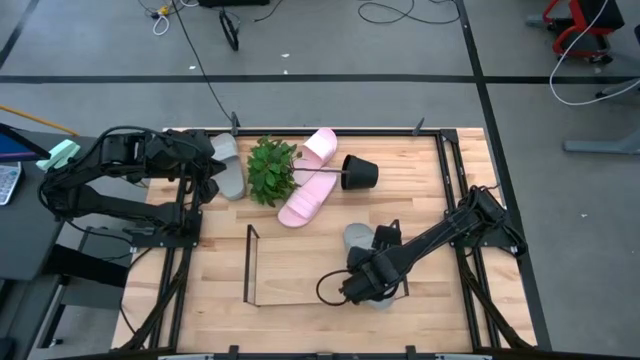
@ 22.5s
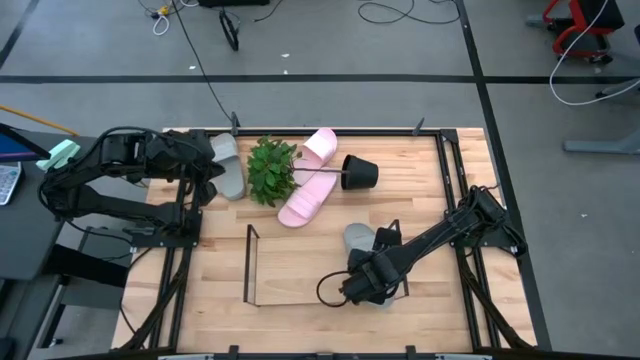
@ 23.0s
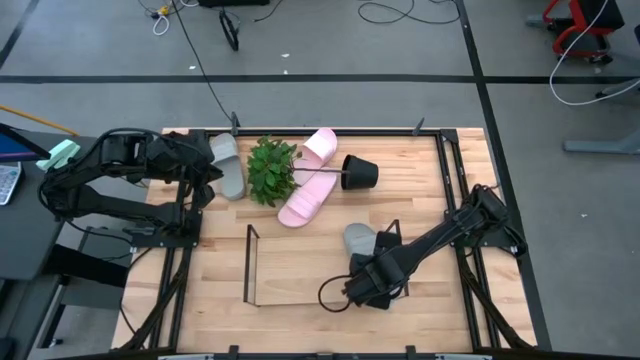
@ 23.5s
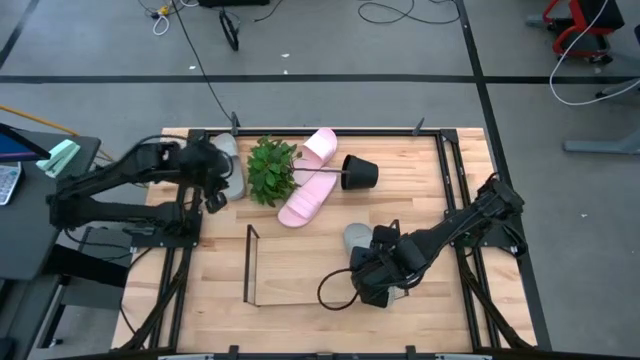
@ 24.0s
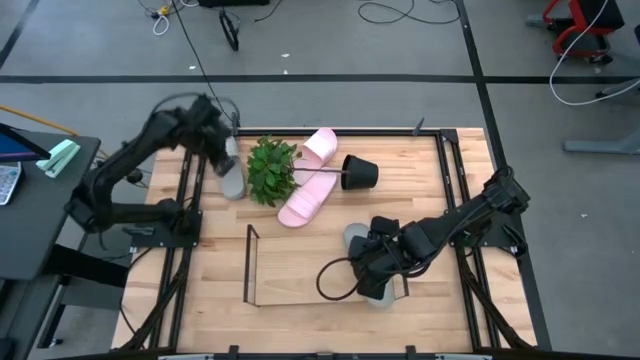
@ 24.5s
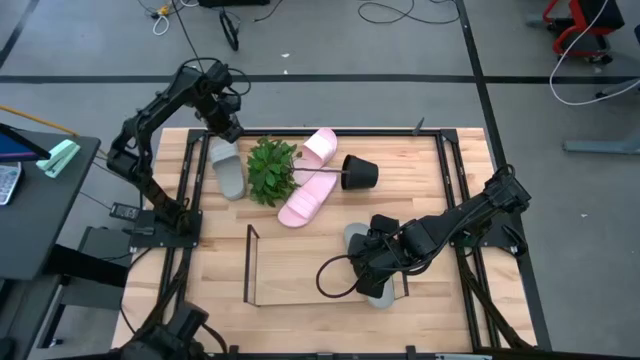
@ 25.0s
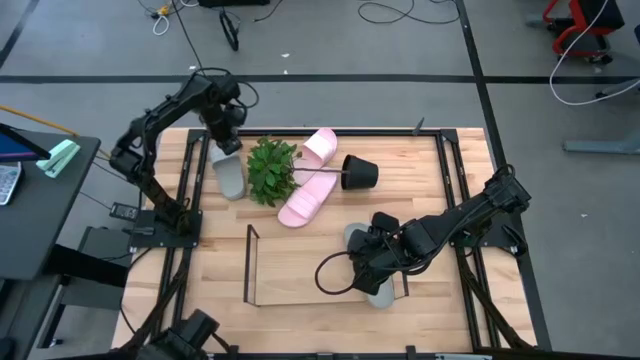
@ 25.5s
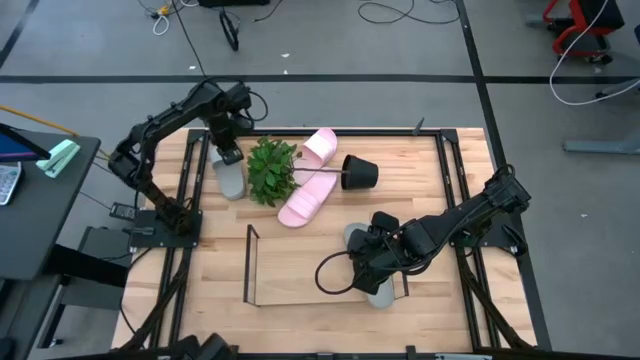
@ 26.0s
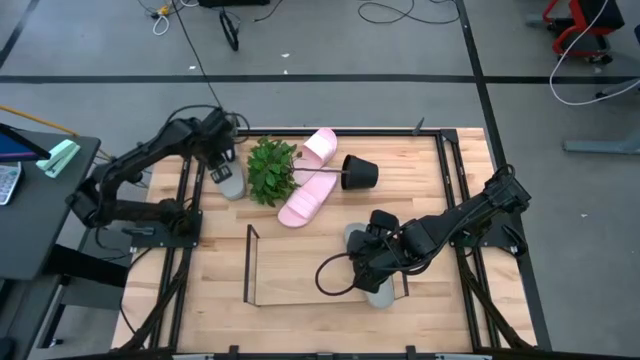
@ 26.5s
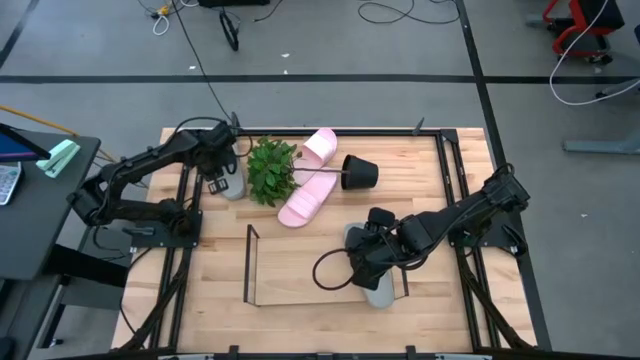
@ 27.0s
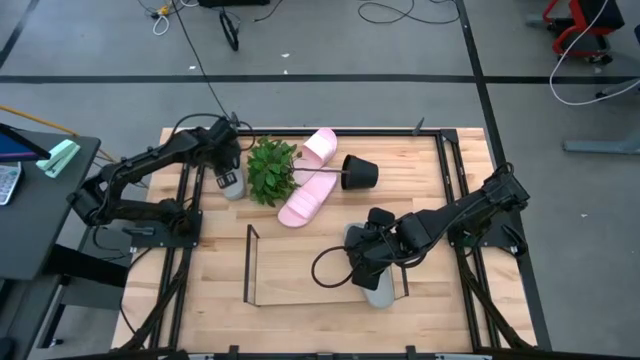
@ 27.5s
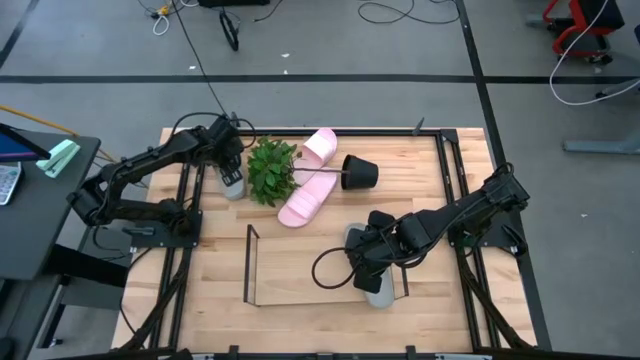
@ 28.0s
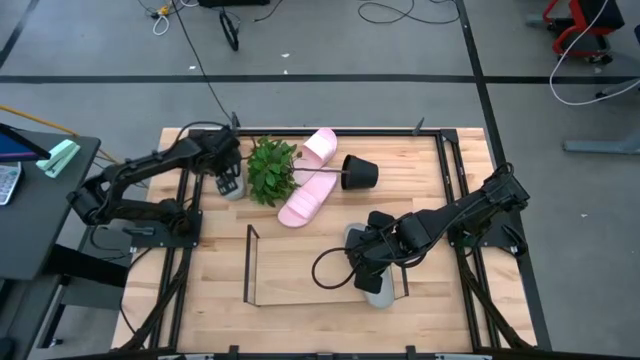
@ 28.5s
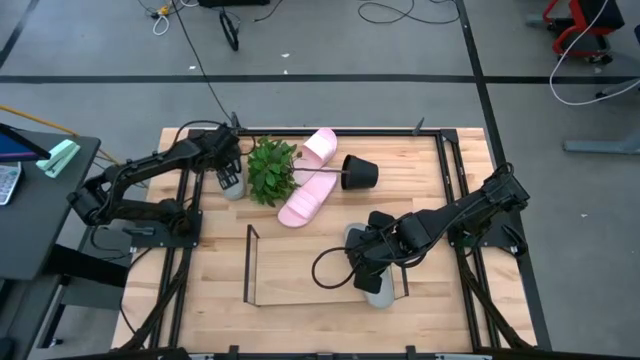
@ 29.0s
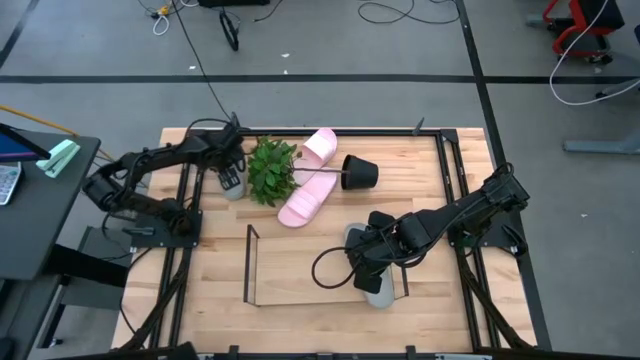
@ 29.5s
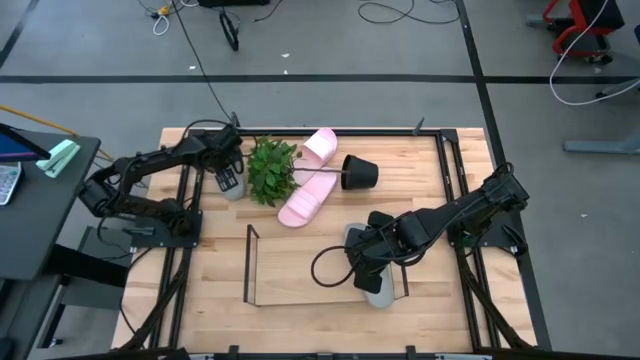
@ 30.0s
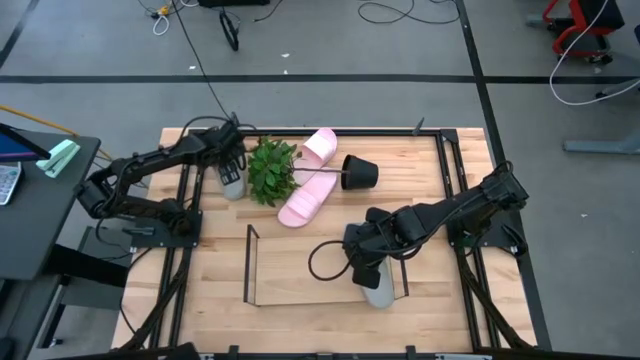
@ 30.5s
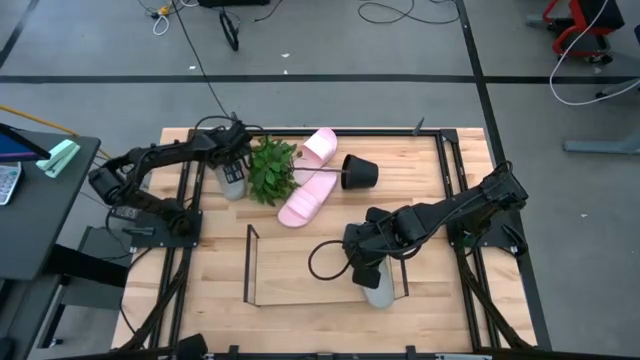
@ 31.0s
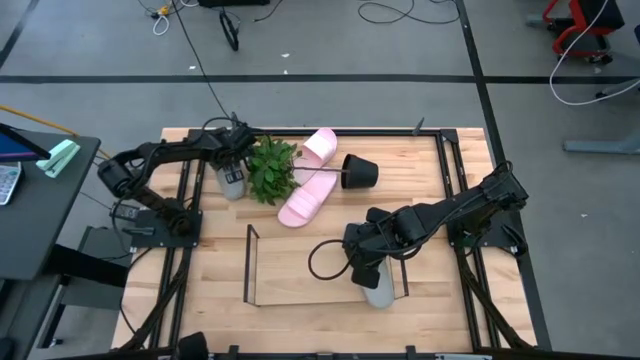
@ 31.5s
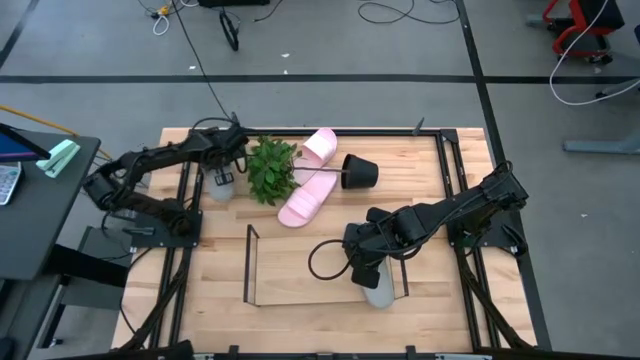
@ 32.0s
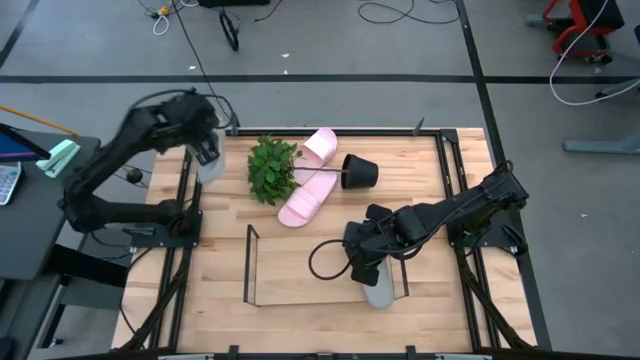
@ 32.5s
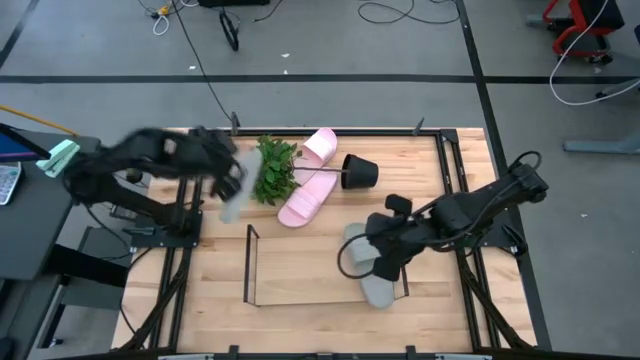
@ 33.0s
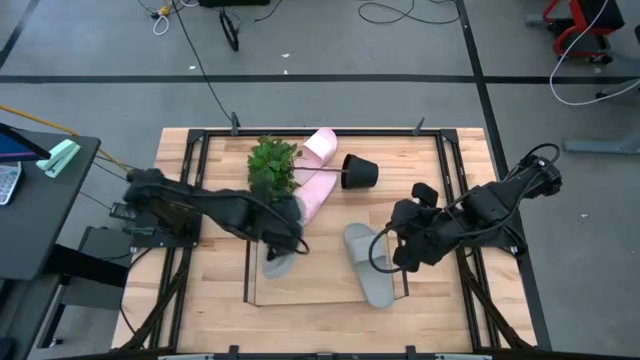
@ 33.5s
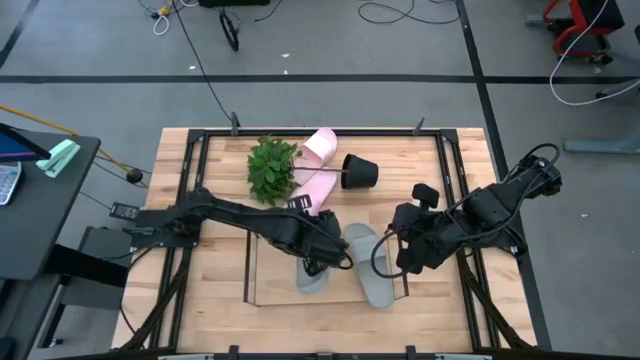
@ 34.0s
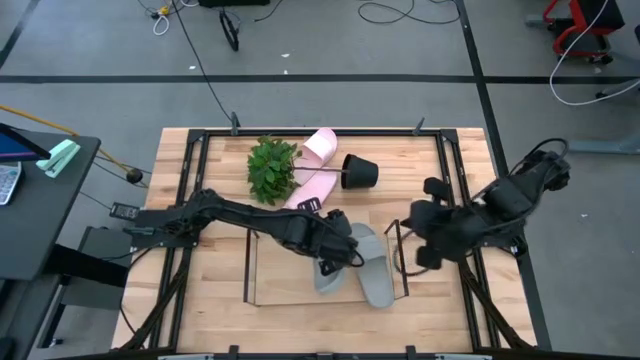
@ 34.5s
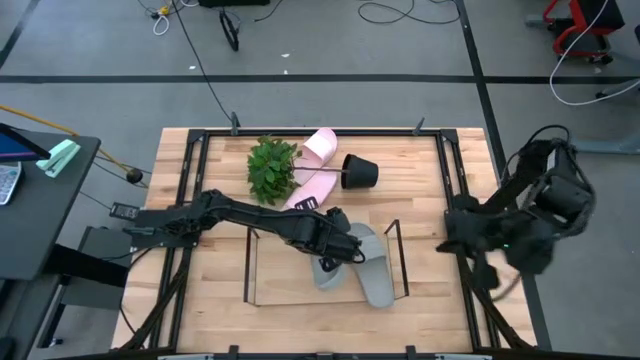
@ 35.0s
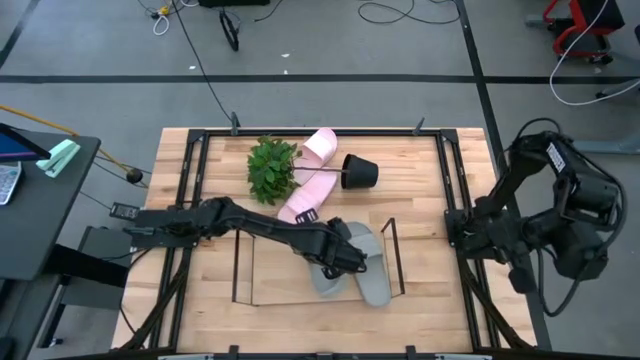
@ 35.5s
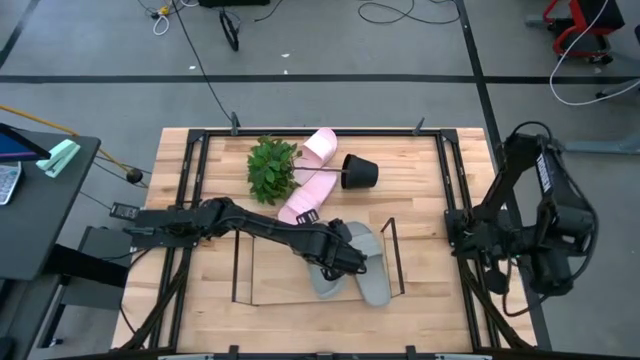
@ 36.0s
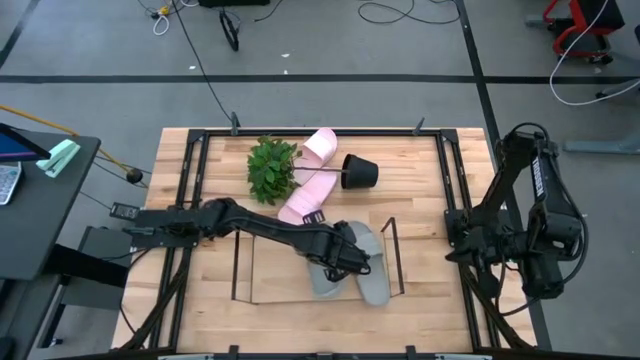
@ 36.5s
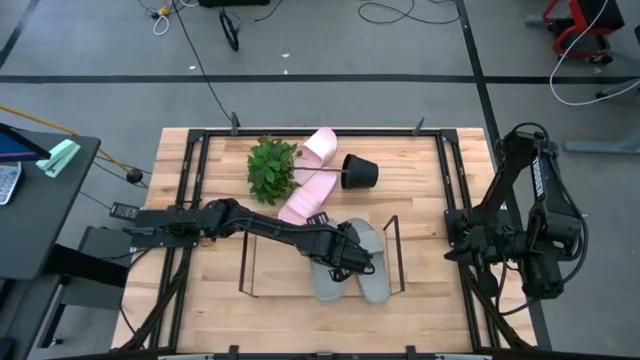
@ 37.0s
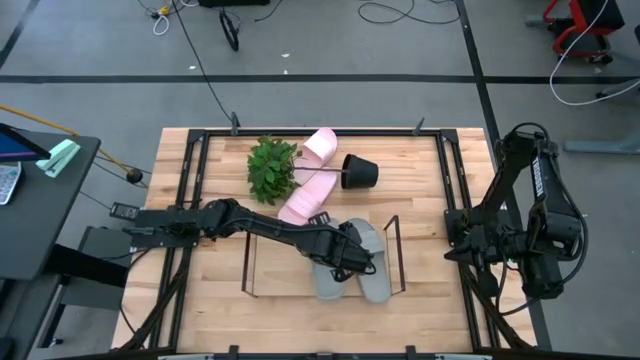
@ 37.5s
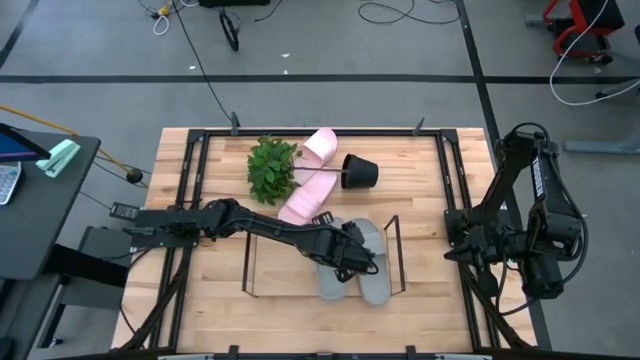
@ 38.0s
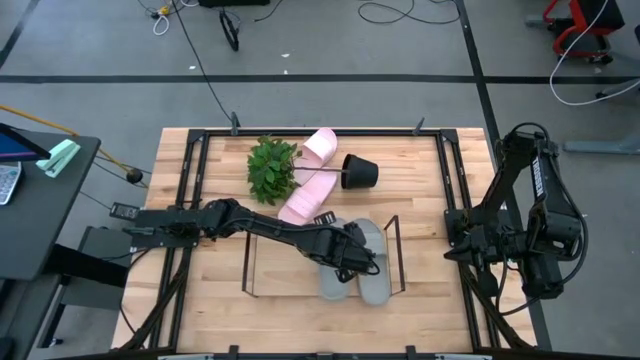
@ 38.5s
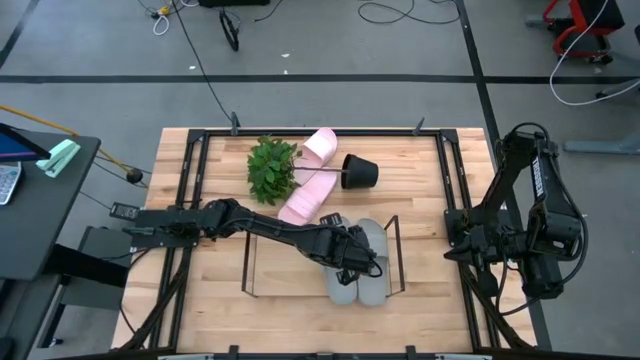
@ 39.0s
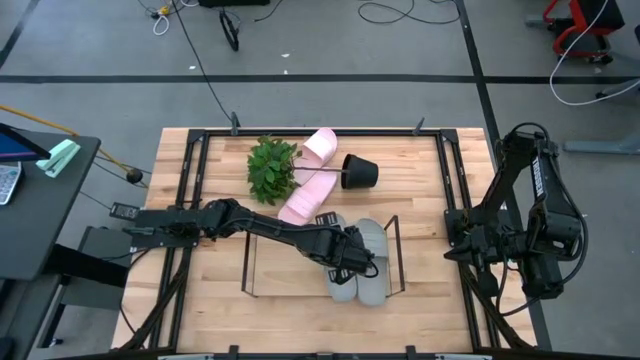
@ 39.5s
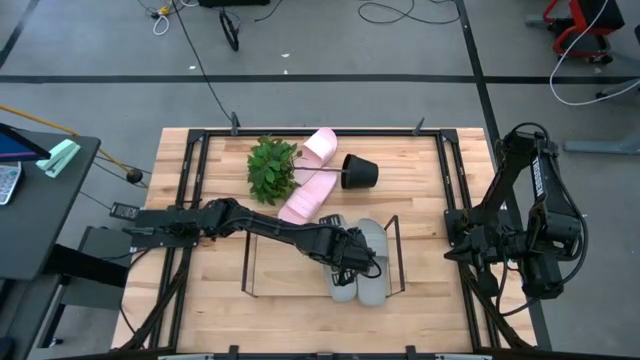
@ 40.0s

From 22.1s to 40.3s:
Task: Pick and place slides into the shelf
Put the gray slipper on the shelf

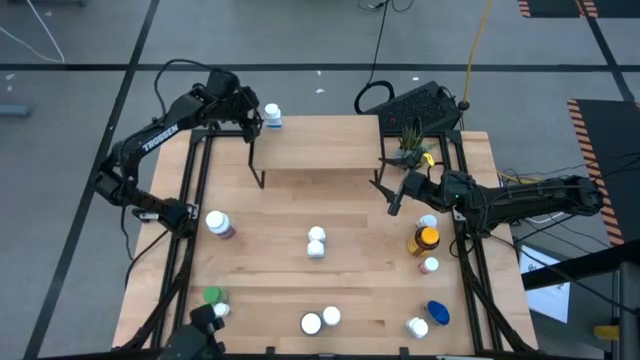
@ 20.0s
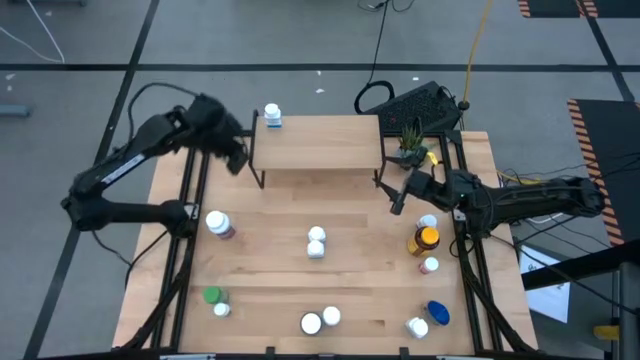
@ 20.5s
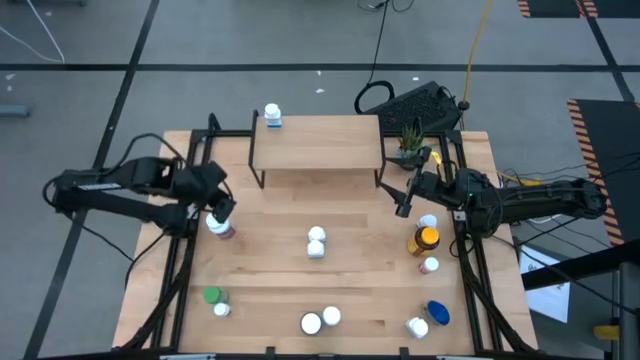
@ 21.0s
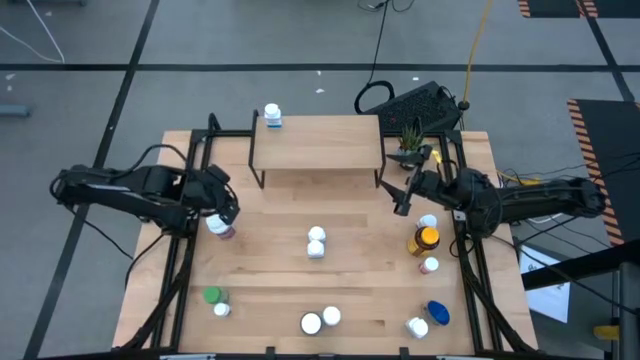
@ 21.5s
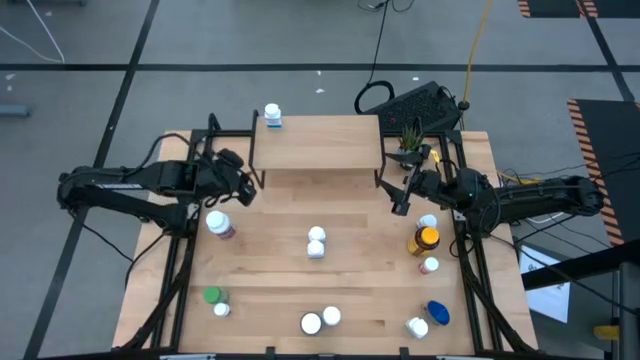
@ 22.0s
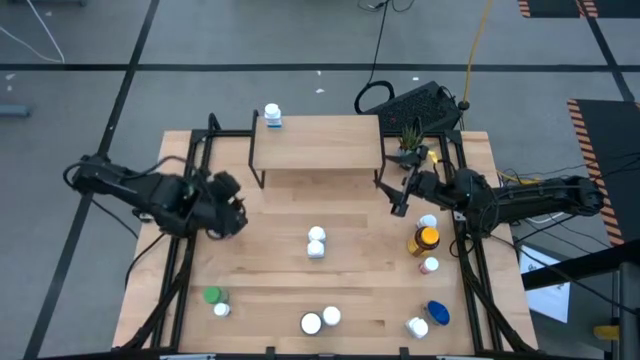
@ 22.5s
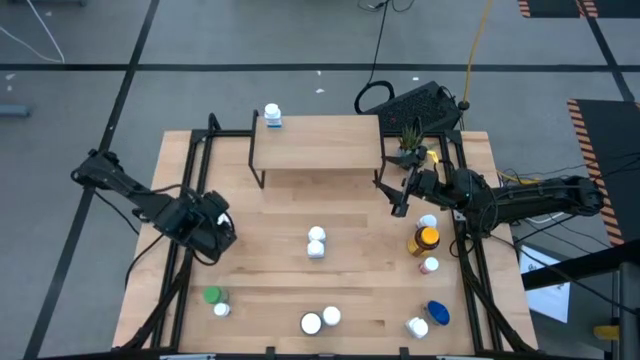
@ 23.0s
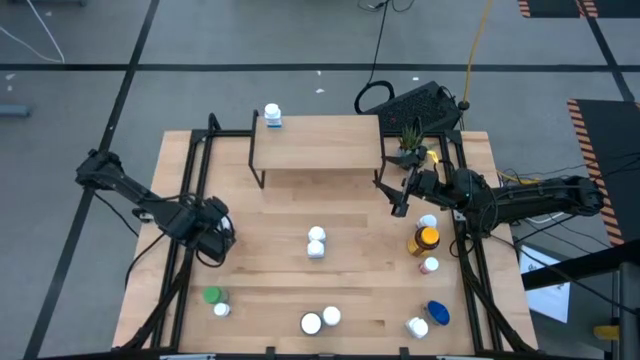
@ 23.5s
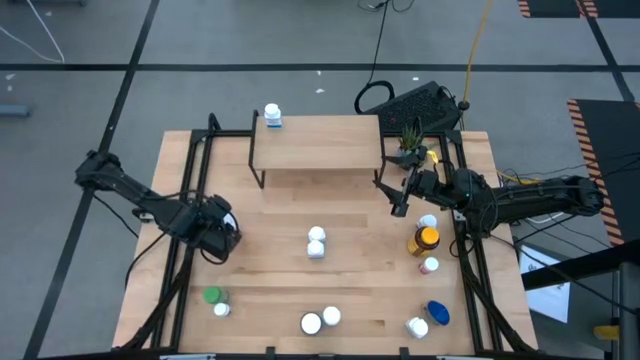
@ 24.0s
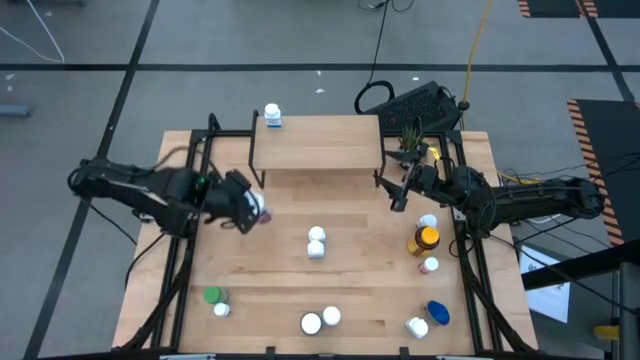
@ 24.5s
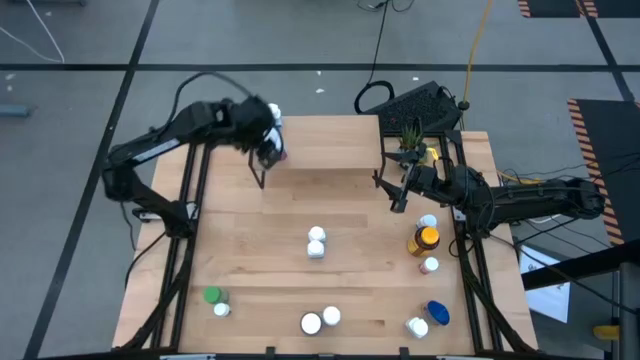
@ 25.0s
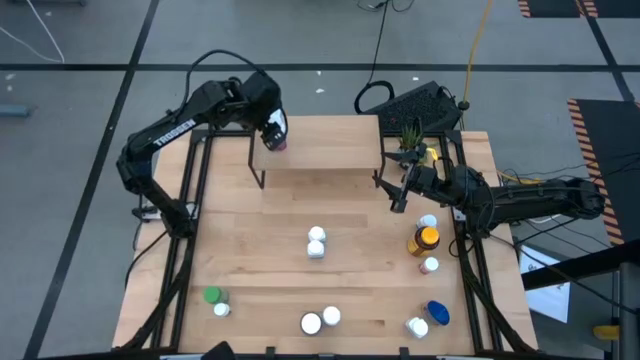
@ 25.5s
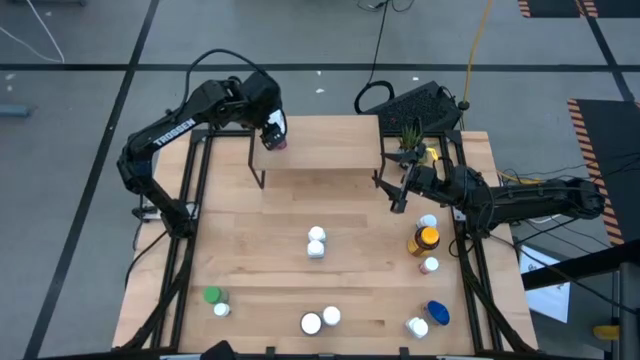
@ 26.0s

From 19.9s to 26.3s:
Task: Pick and place medicine bottles onto shelf by color
Put the white and purple pill bottle on the shelf
